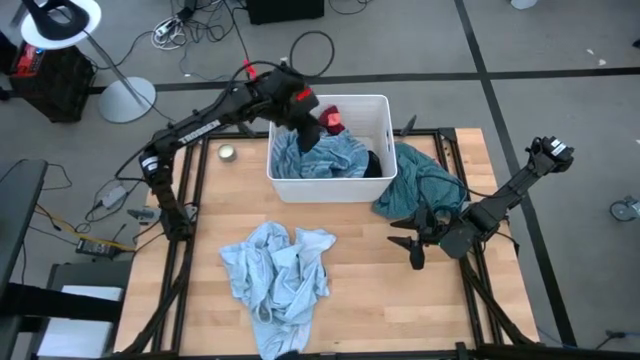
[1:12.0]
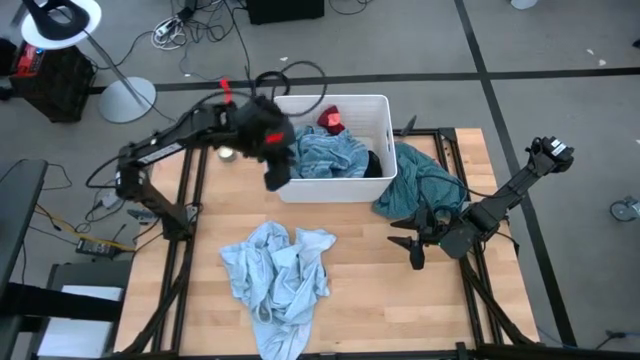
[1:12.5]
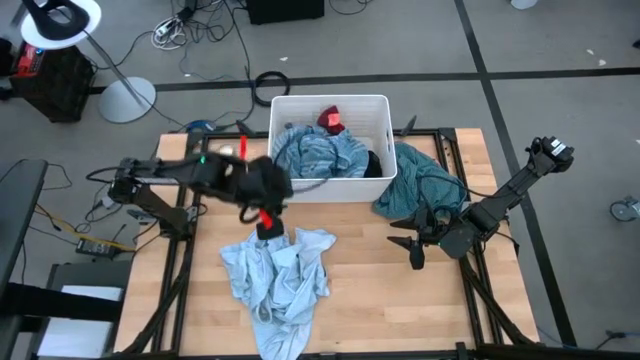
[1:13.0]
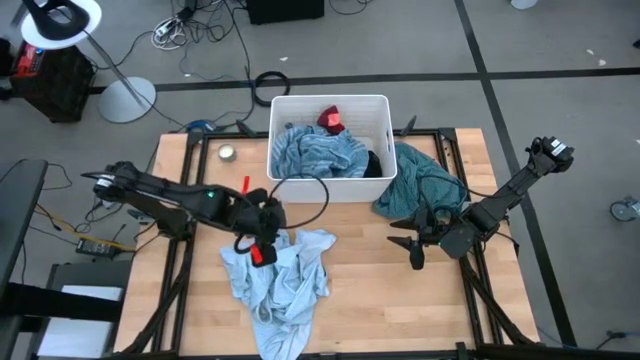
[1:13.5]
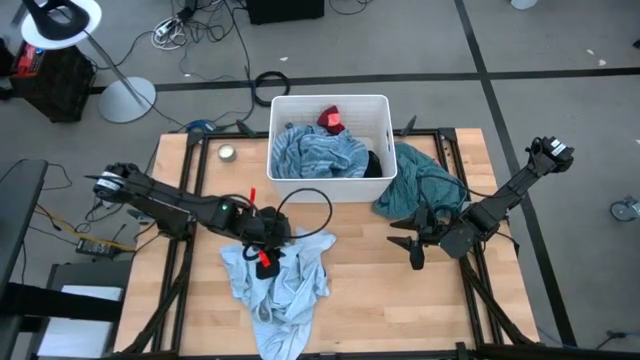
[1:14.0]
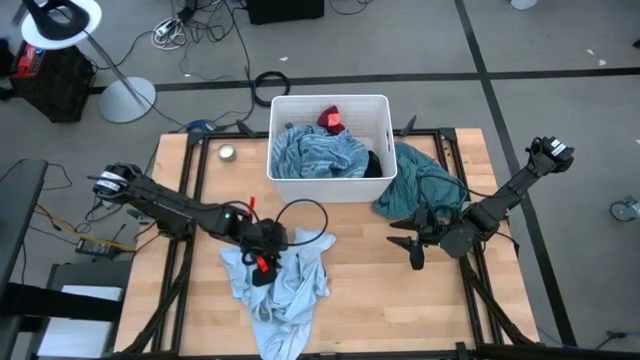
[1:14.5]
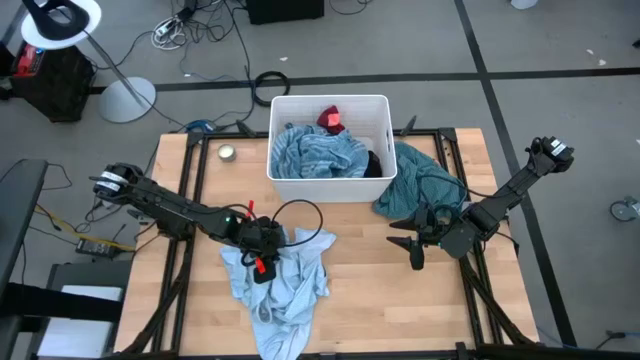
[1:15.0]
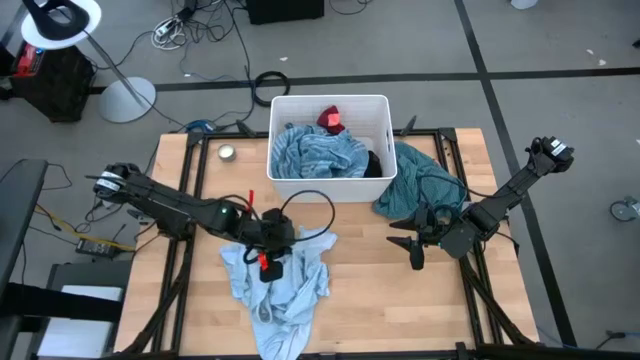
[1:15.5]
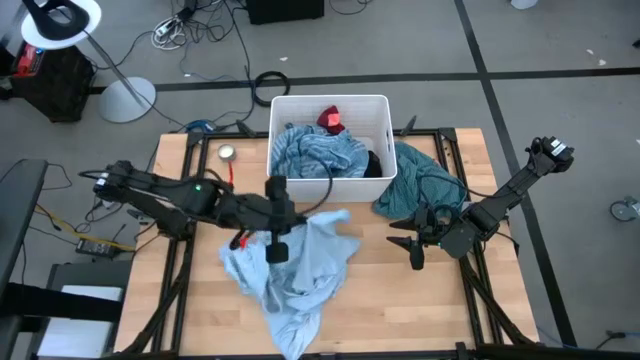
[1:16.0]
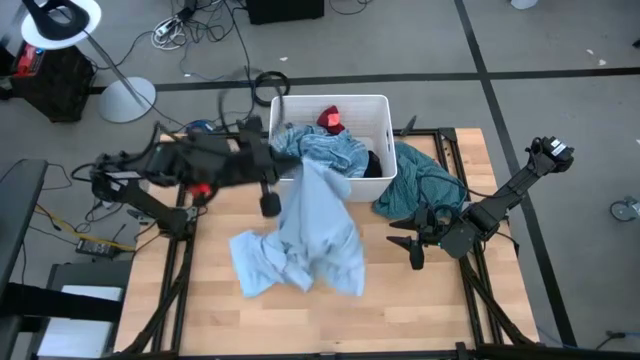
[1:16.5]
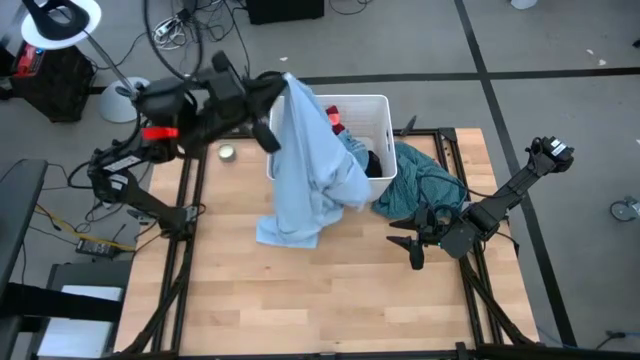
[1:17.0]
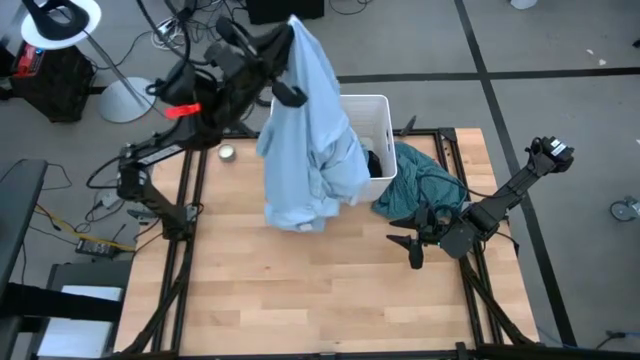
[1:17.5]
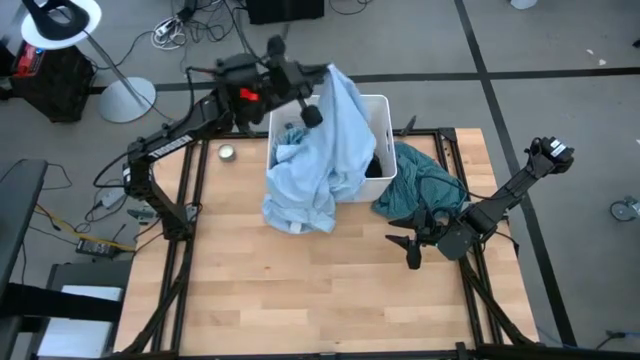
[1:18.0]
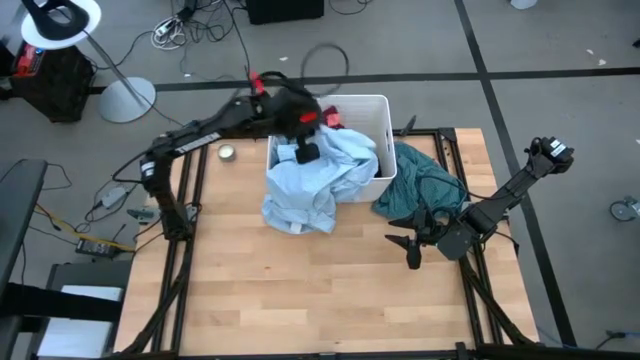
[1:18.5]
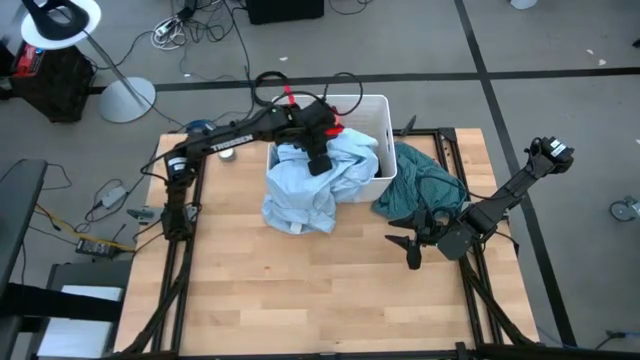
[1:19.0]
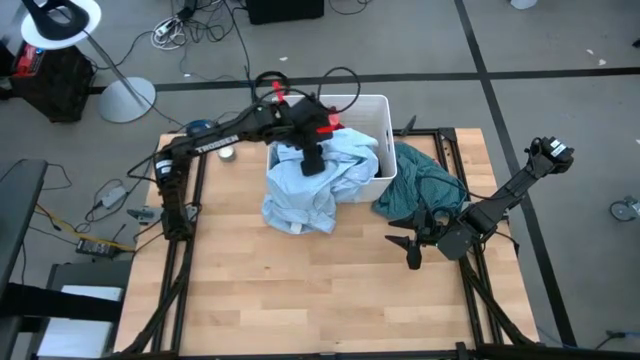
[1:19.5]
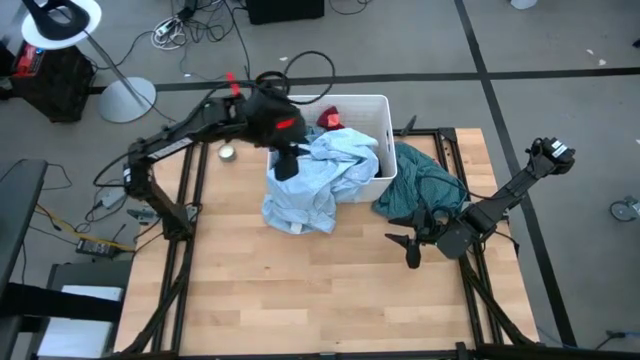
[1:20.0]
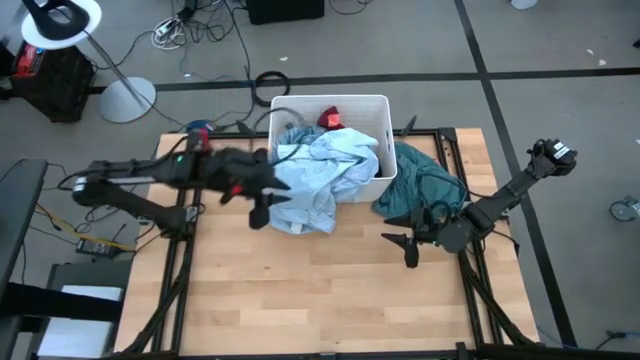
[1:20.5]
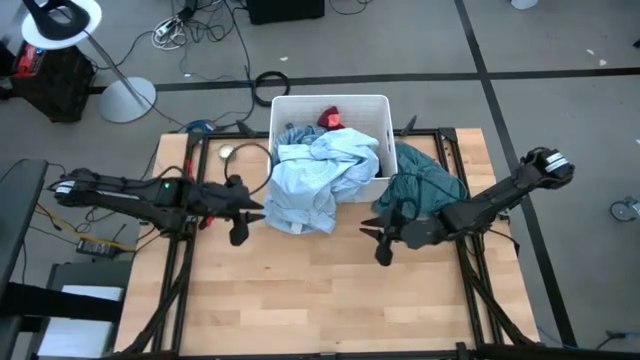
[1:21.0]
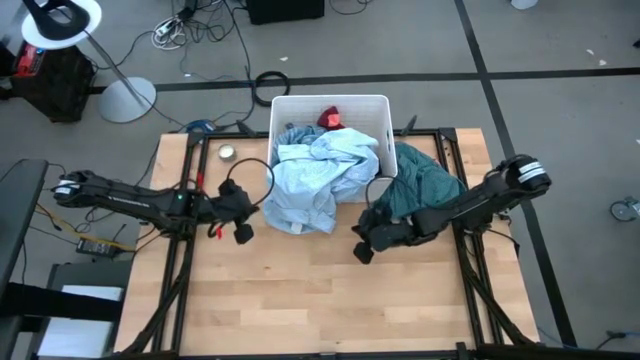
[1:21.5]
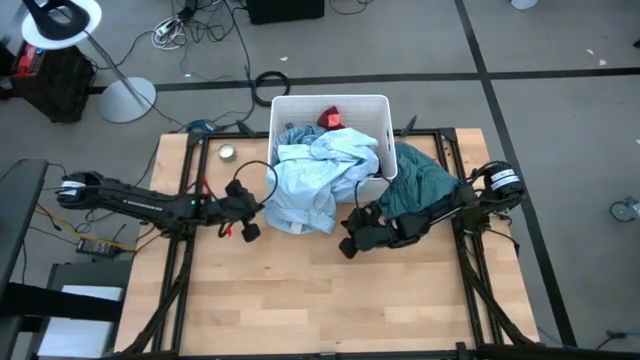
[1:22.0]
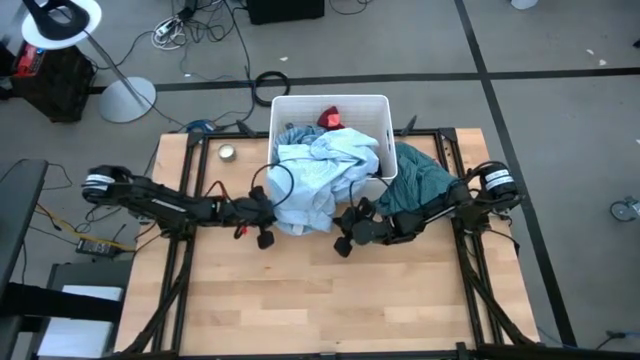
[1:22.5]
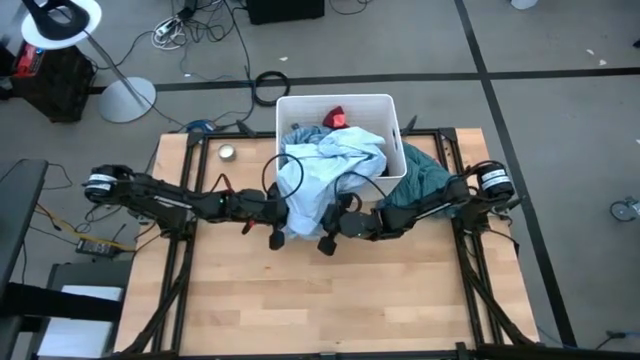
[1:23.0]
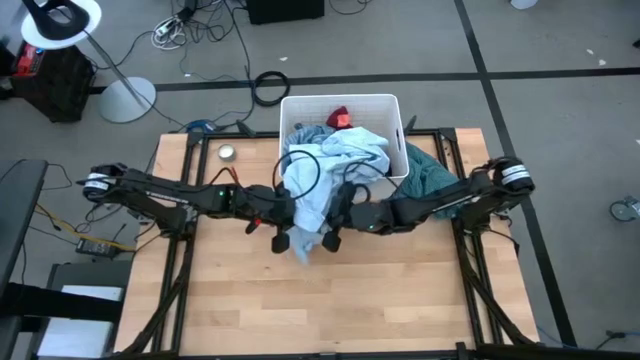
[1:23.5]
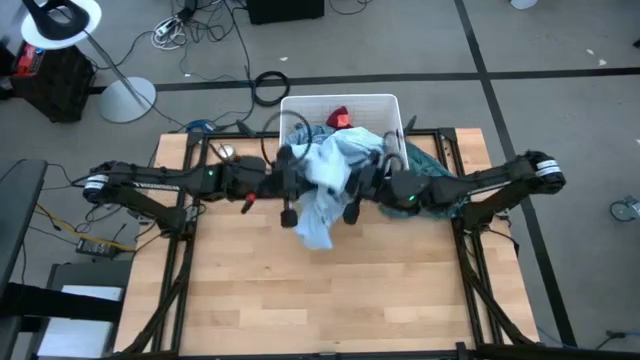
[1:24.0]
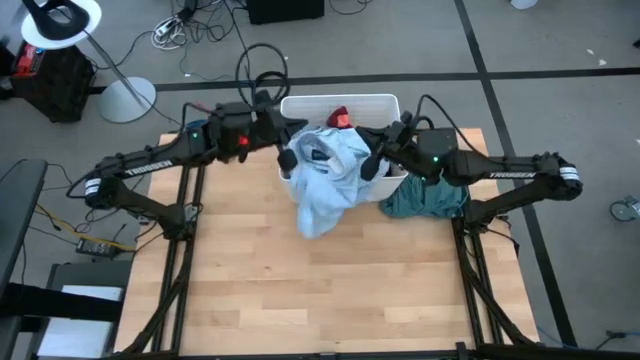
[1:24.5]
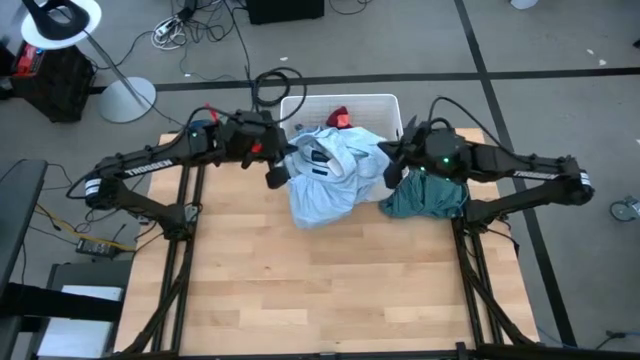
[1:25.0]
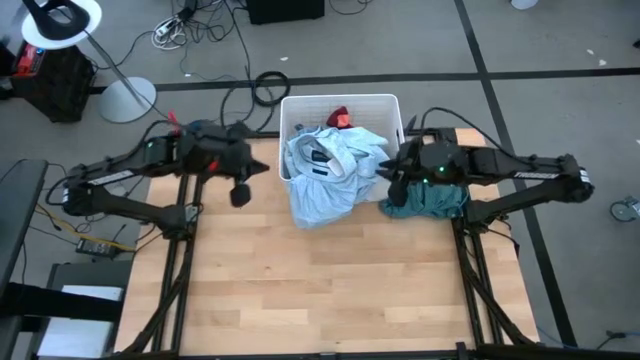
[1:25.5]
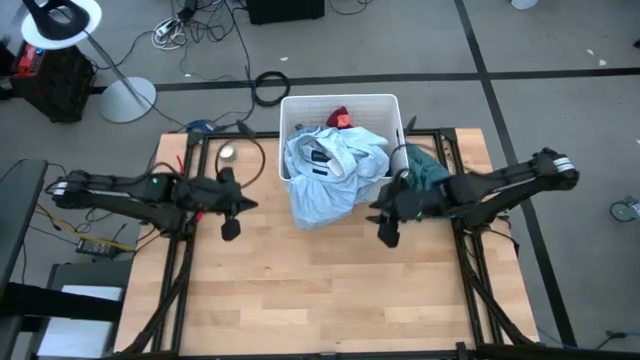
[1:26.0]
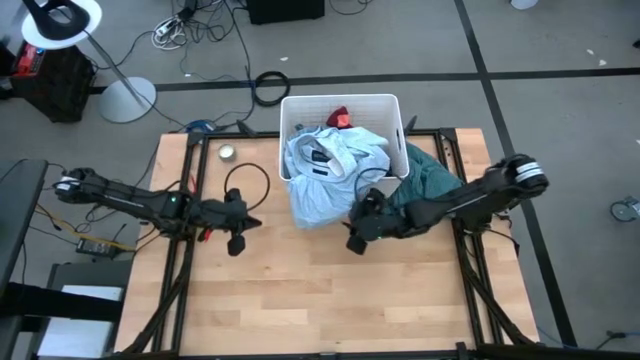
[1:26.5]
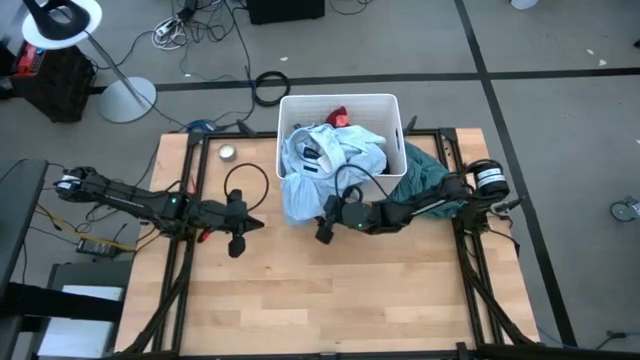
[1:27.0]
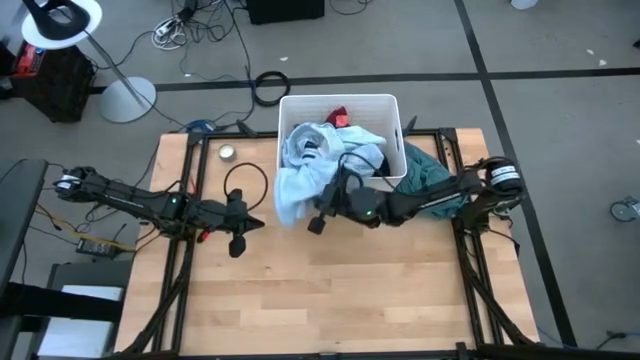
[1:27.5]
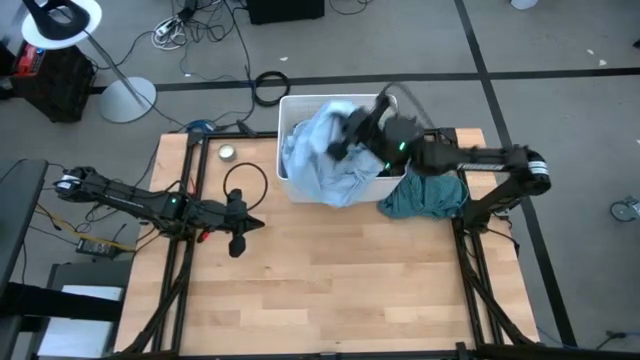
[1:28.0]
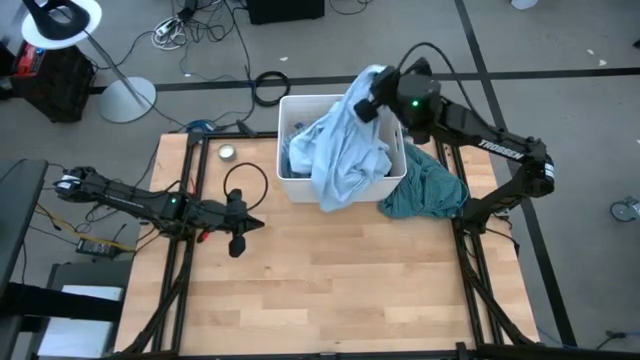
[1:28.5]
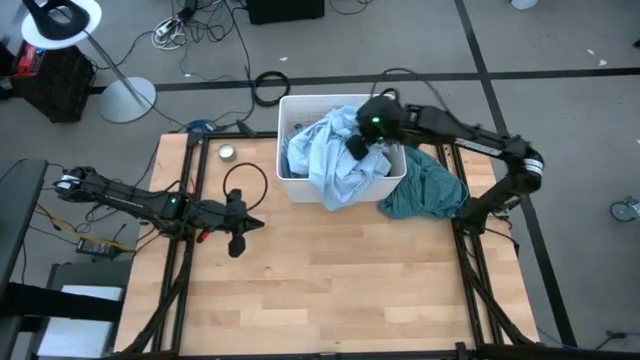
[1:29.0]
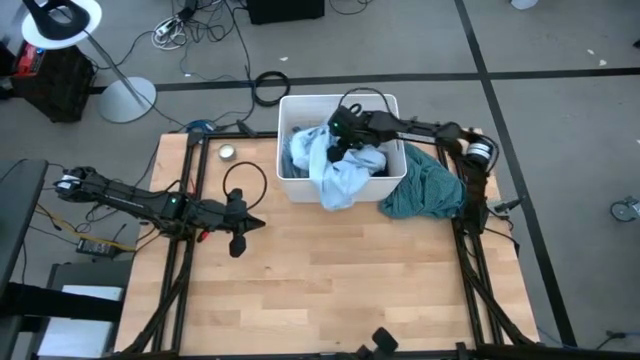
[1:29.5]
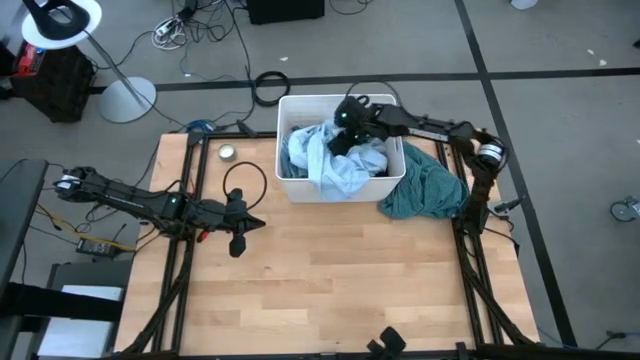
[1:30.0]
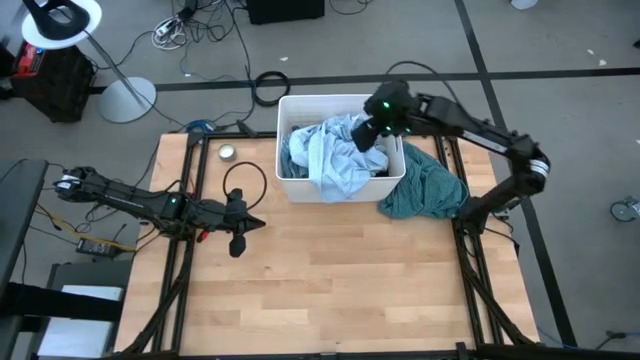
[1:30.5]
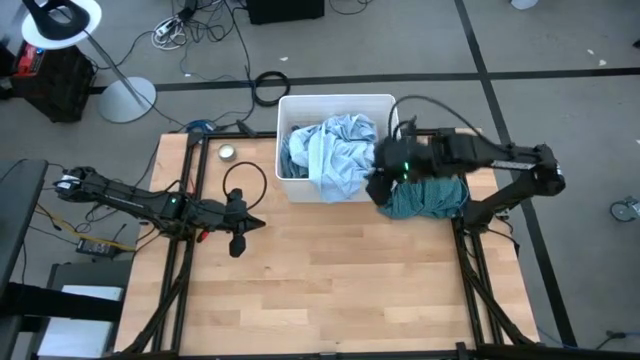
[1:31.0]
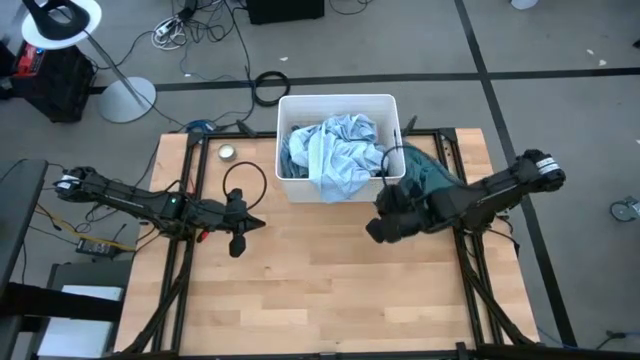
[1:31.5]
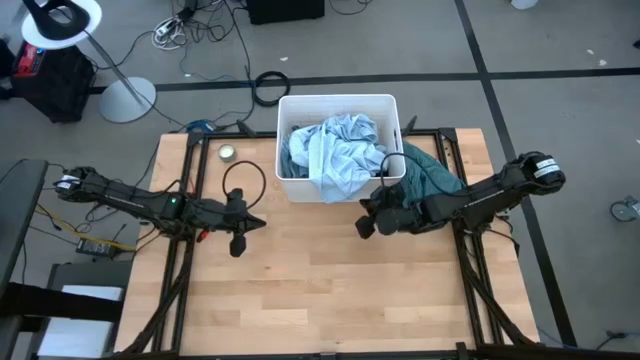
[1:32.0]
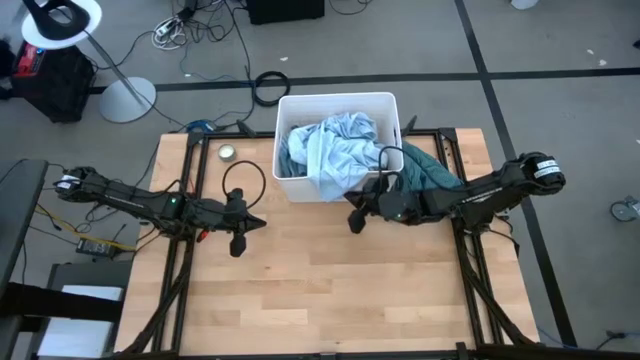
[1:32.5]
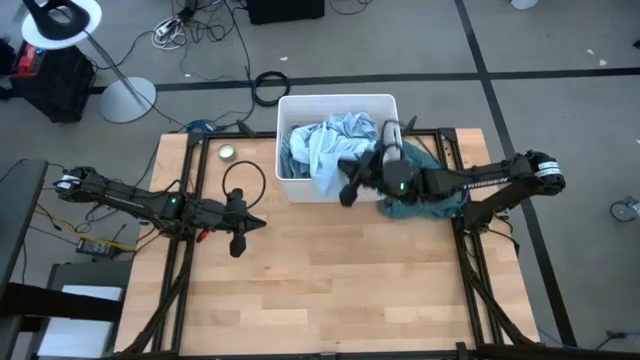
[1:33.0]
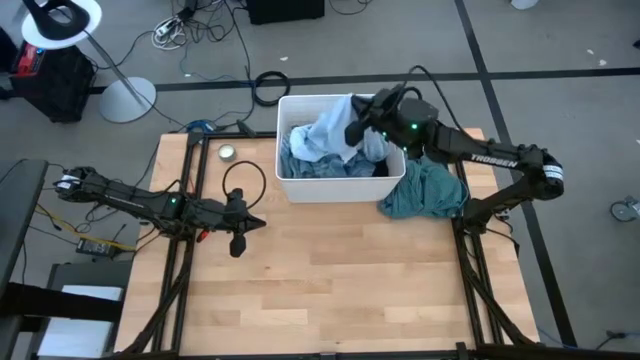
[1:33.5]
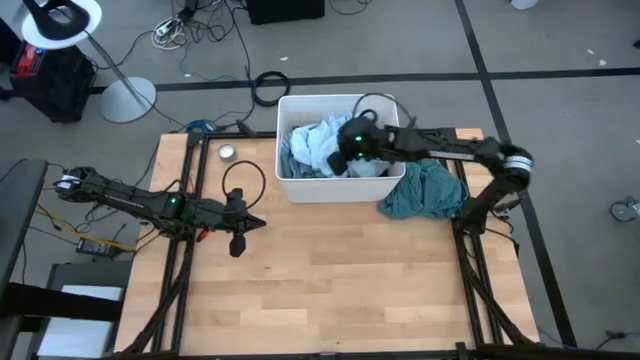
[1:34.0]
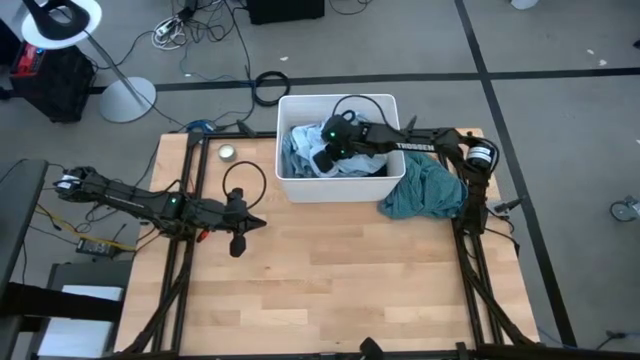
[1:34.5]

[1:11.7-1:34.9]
Task: Sort clothes
Put the blue long sleeve into the laundry bin
